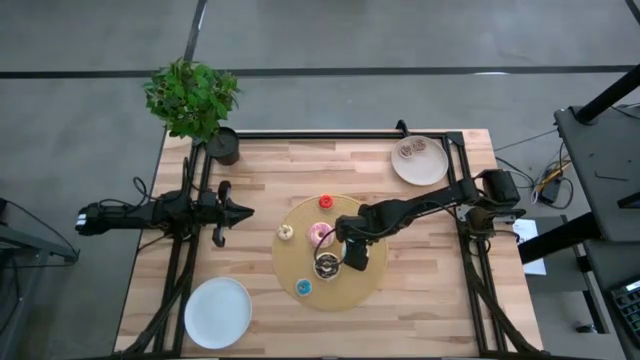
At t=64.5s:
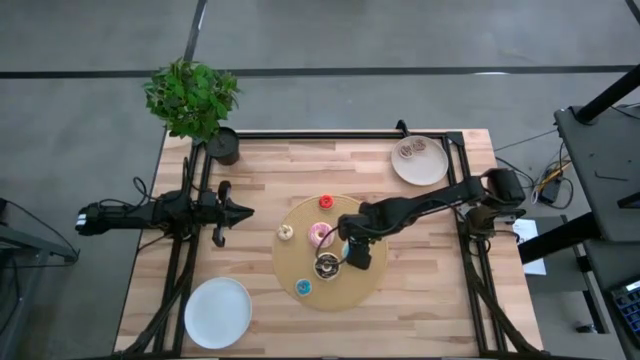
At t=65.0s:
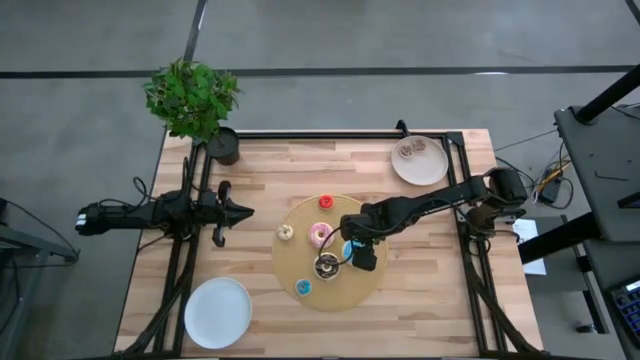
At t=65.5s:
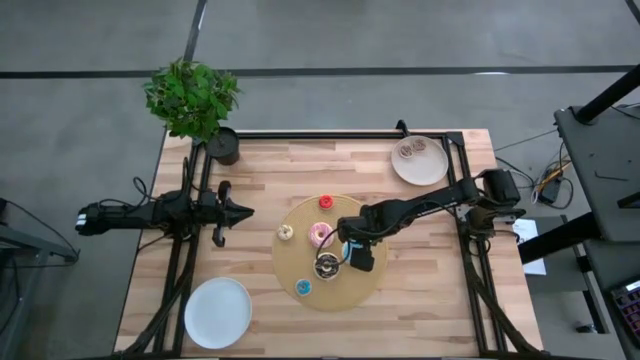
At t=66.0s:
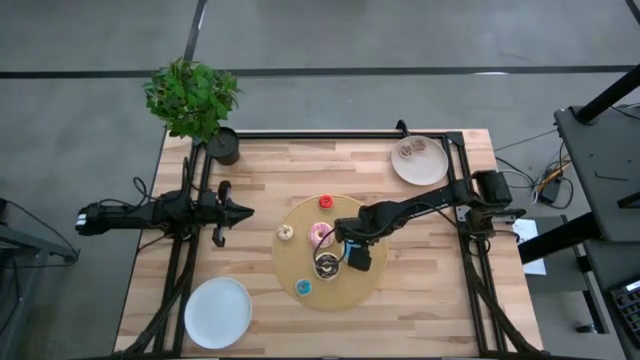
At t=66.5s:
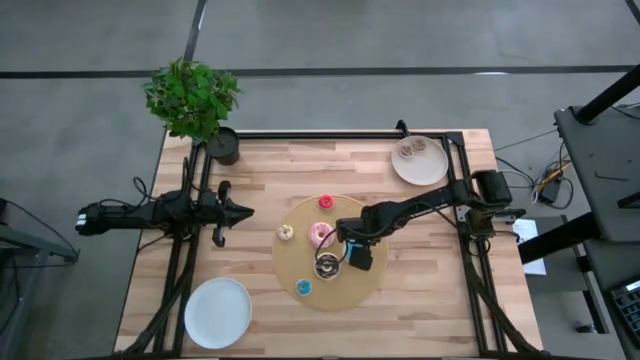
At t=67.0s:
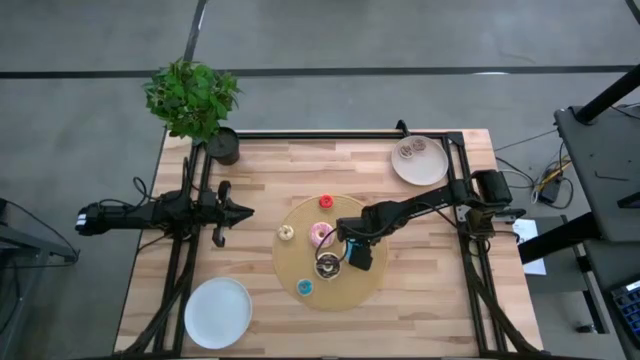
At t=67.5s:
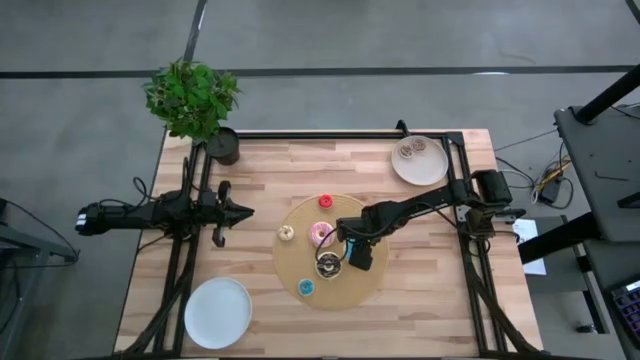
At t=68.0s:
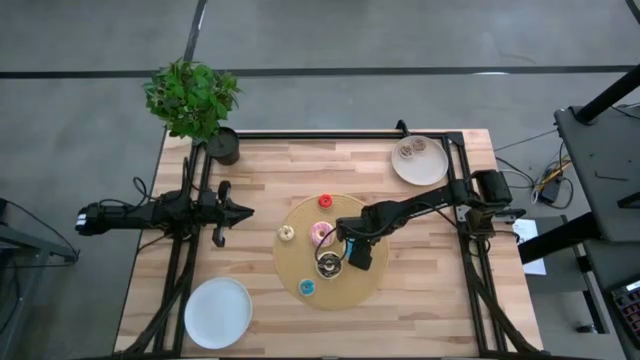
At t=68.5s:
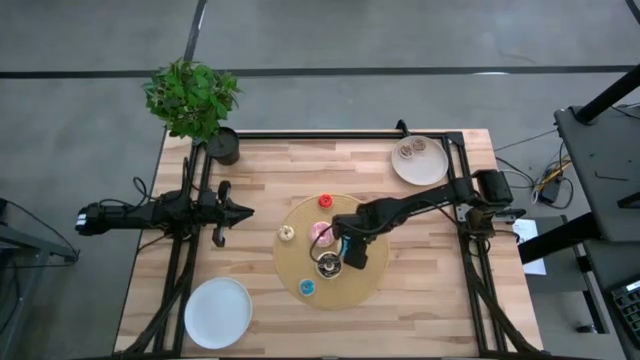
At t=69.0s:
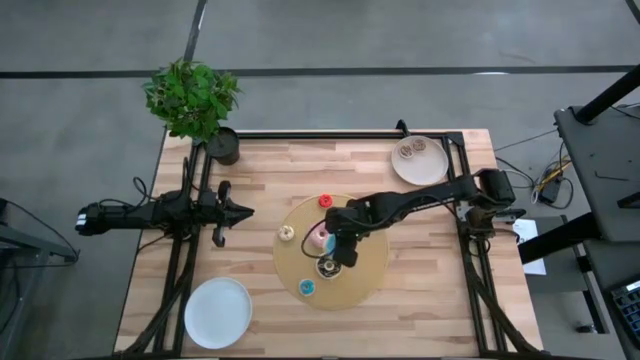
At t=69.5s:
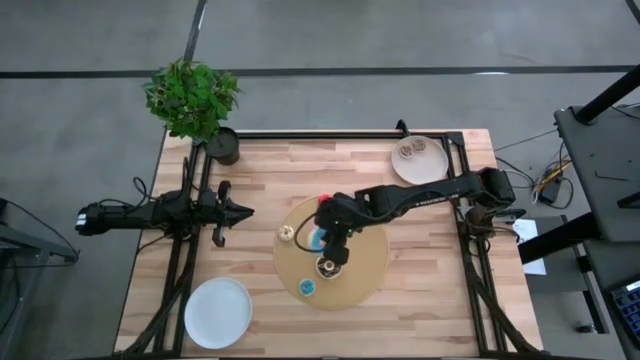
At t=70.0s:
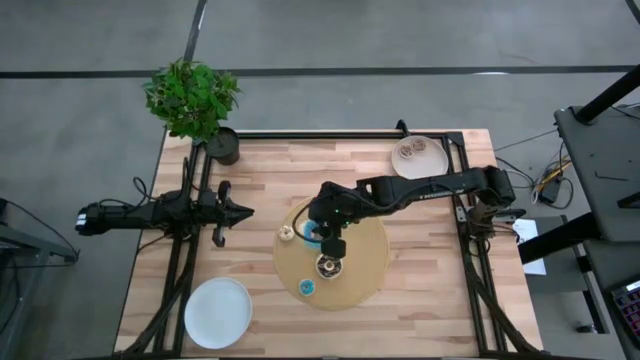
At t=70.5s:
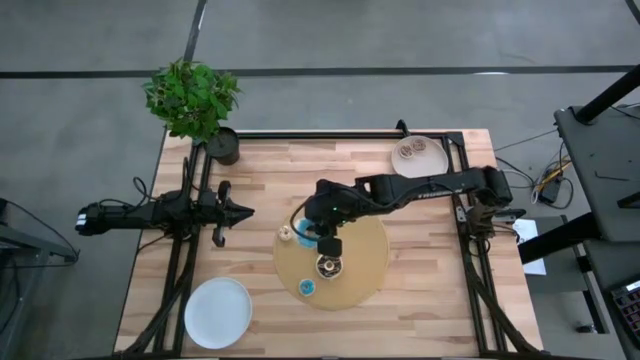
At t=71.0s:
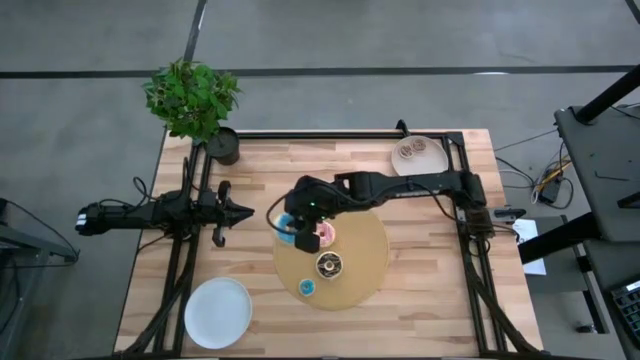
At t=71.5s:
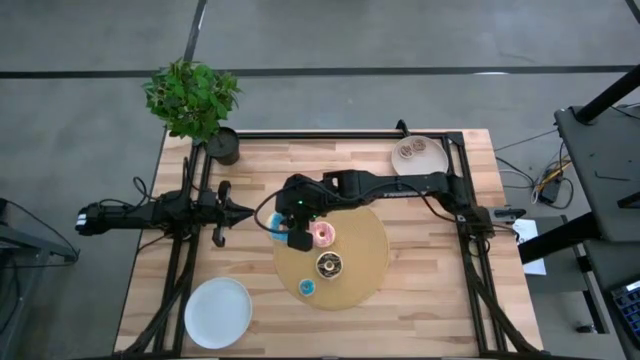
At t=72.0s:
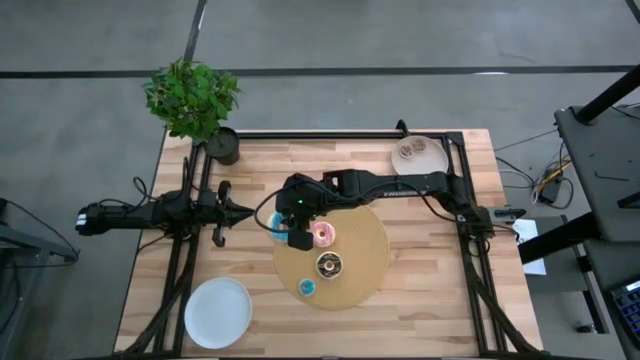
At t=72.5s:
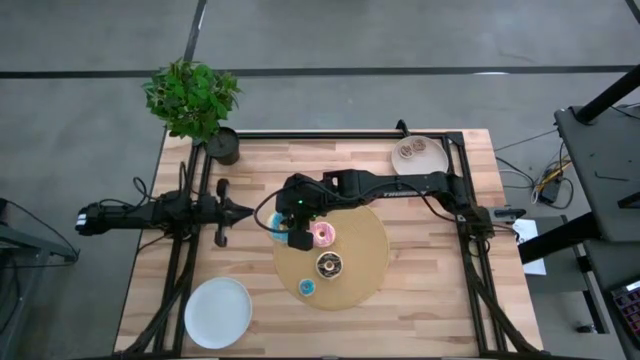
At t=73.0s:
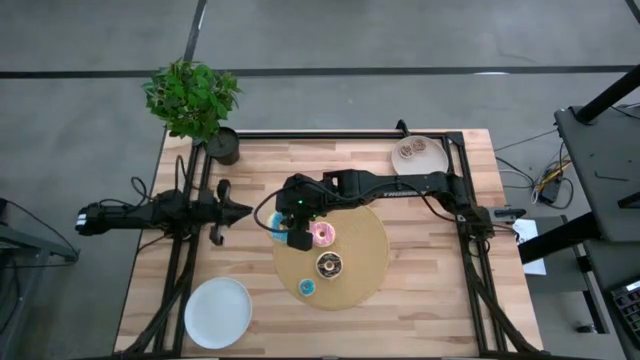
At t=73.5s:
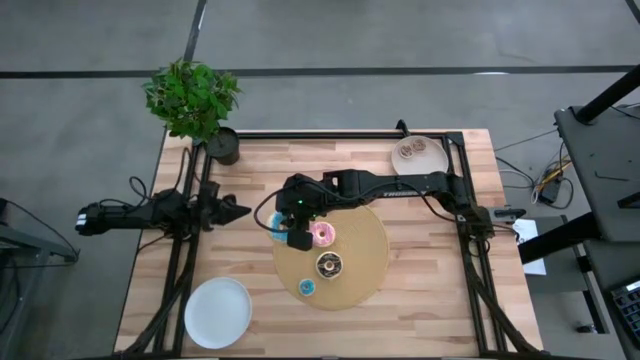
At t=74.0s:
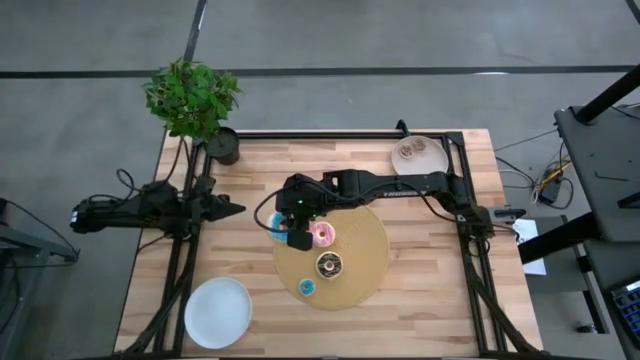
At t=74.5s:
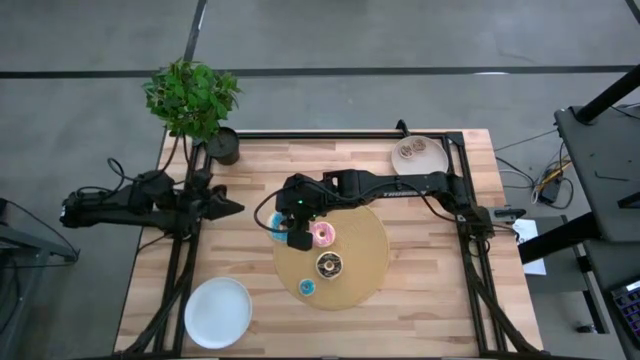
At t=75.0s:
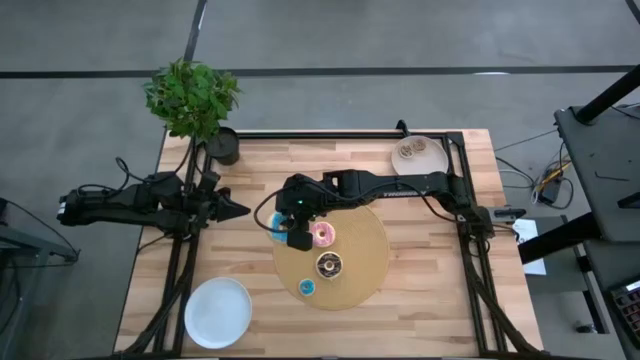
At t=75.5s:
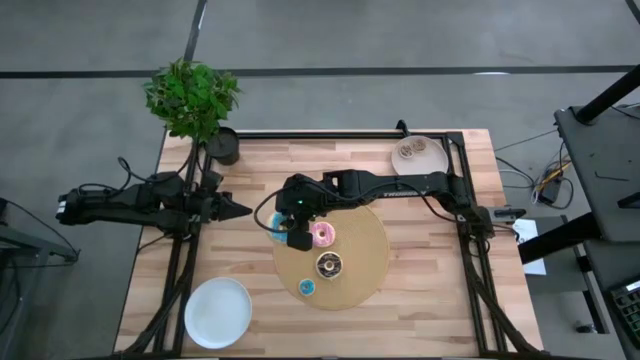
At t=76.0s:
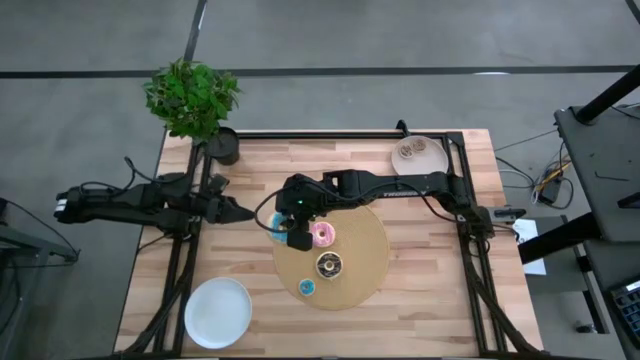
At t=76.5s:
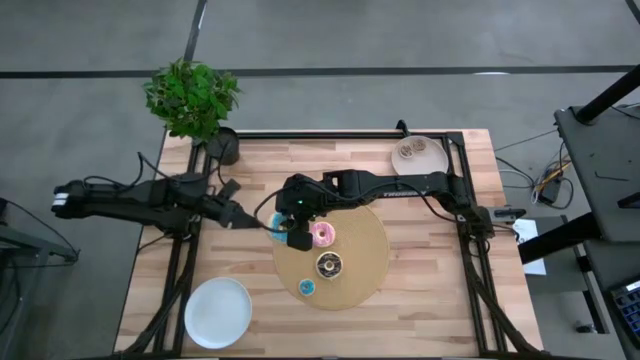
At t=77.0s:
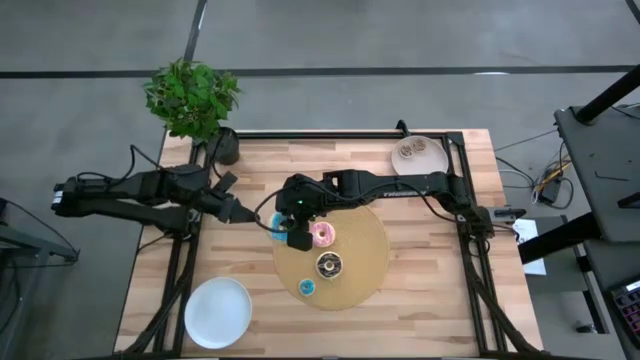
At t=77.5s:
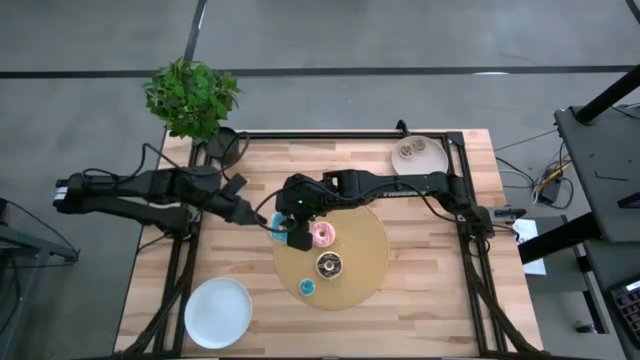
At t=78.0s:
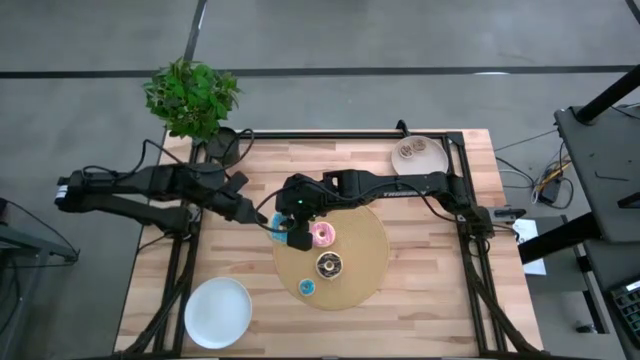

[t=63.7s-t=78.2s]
Task: Pick & Place donuts
Put the large blue donut on the white plate

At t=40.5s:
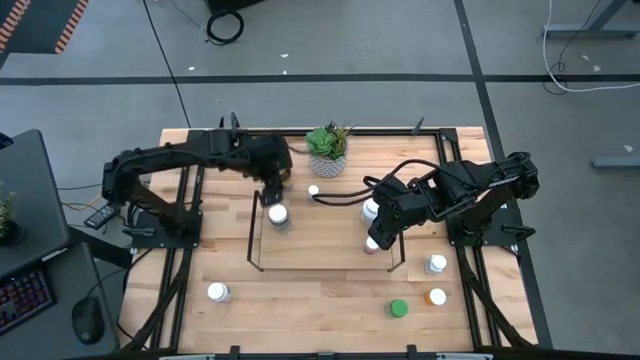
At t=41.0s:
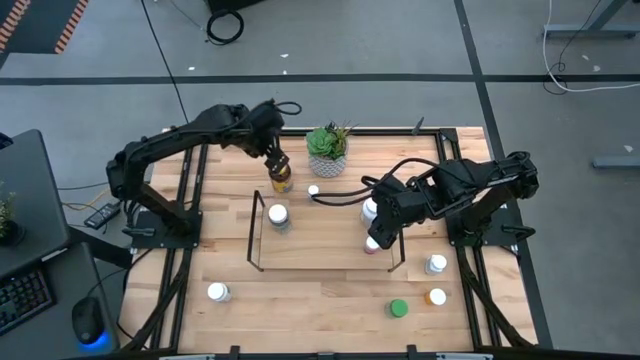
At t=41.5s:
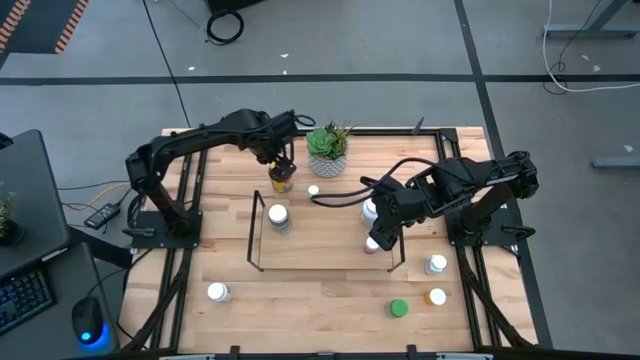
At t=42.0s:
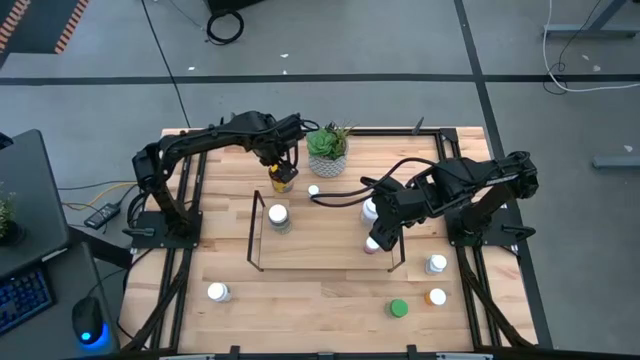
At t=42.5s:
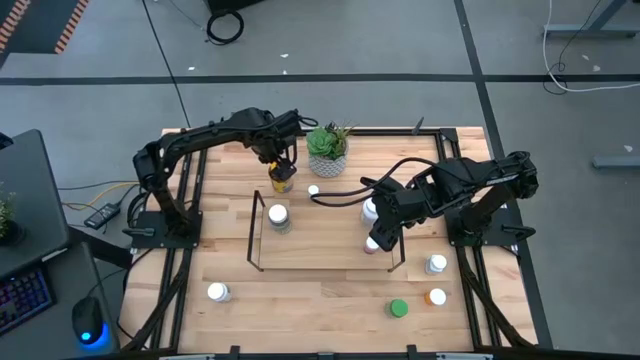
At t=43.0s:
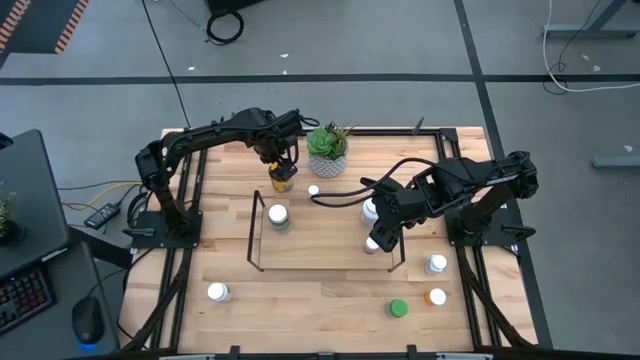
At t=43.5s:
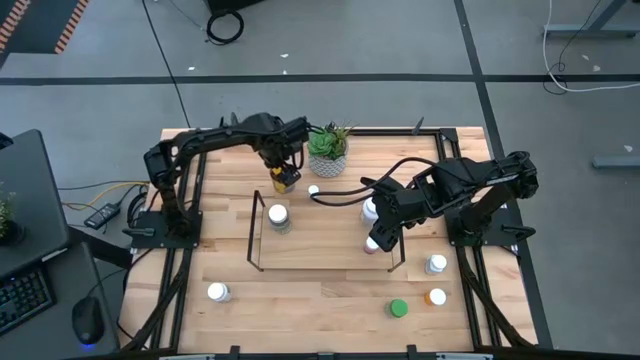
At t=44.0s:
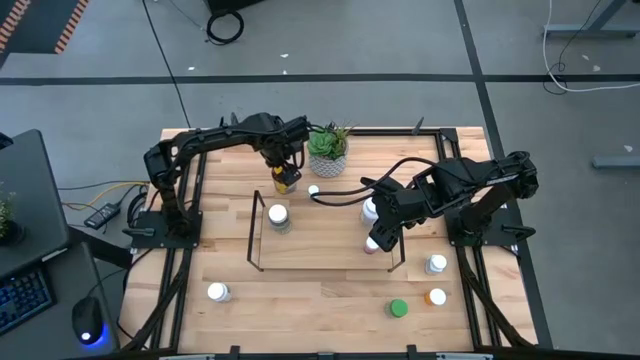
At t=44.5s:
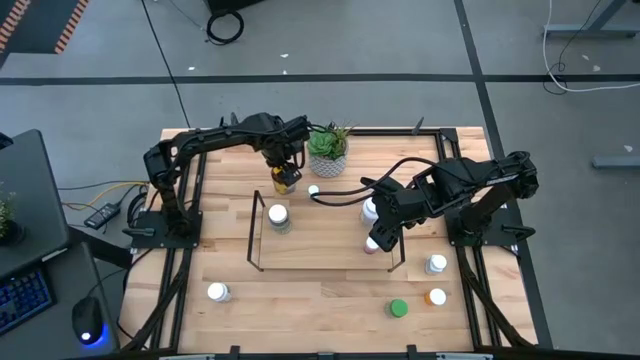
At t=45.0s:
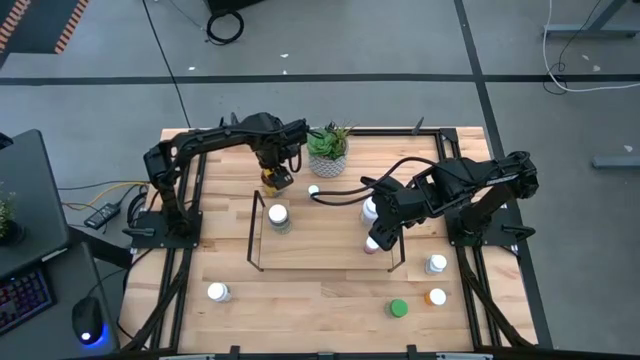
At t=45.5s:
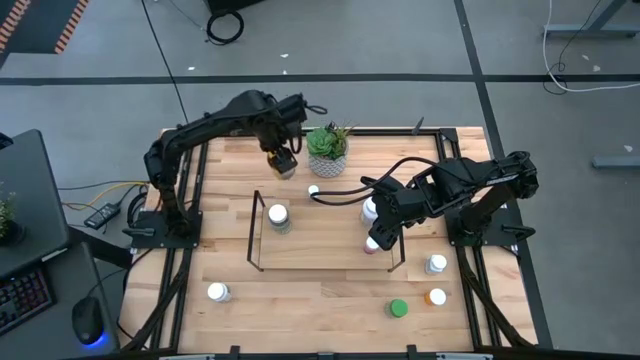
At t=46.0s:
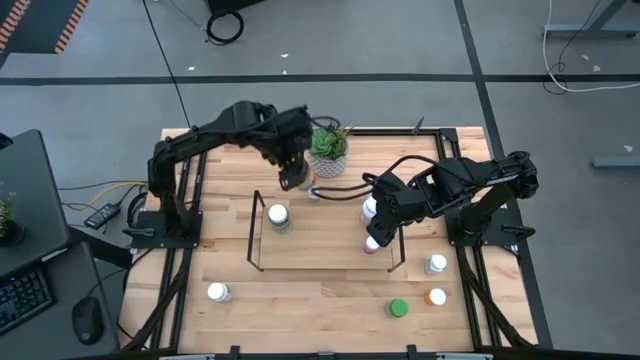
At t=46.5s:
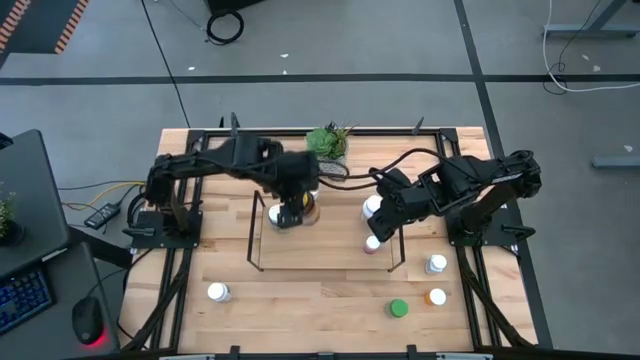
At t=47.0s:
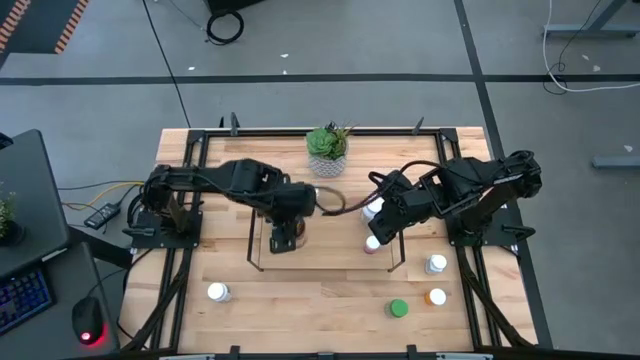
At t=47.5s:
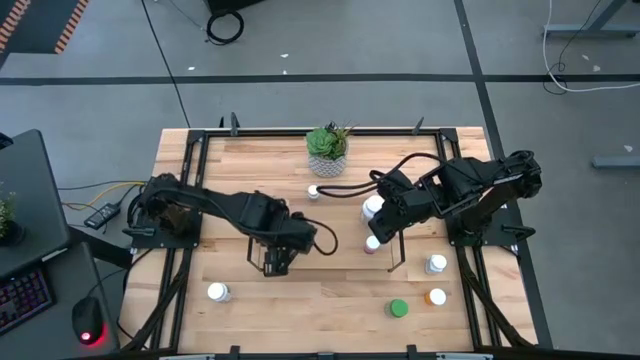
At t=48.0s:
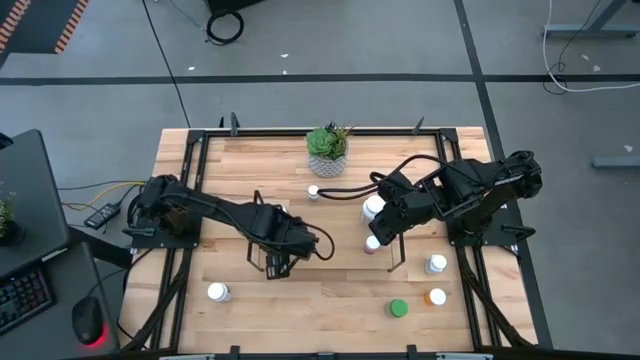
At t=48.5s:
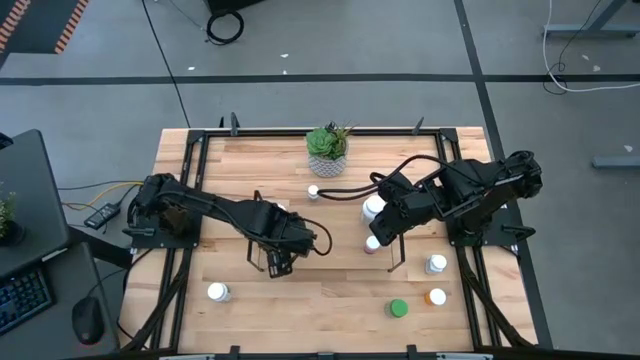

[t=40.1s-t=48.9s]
Task: Pick and place medicine bottles onto shelf by color
Put the large yellow medicine bottle on the shelf
